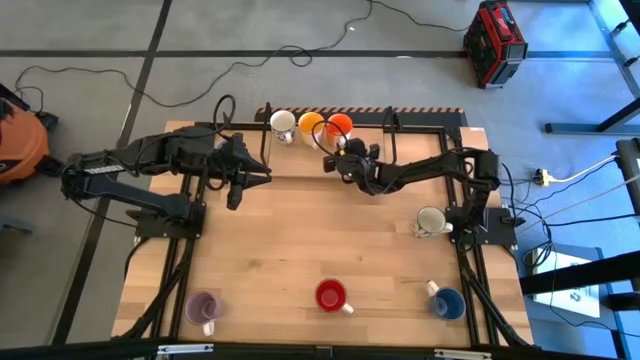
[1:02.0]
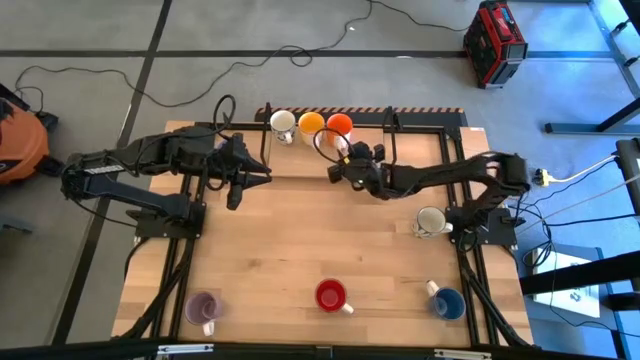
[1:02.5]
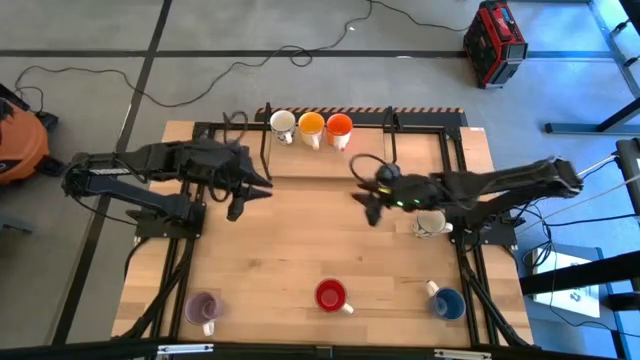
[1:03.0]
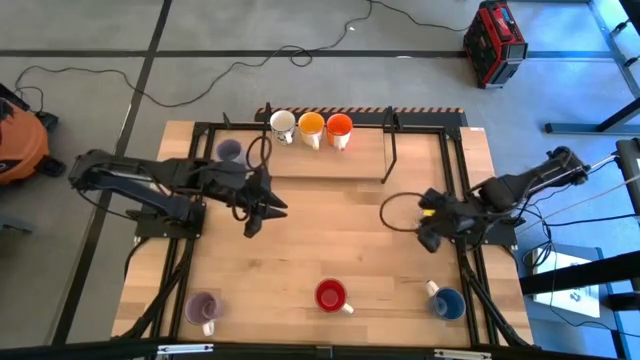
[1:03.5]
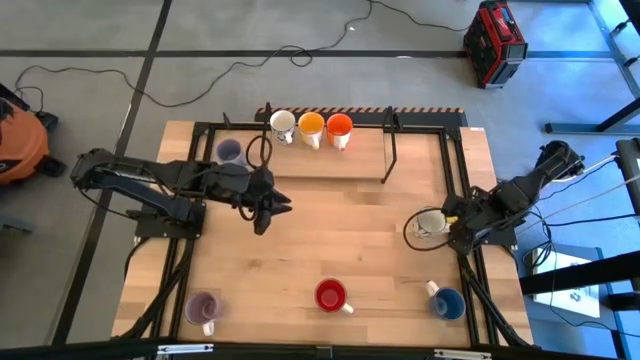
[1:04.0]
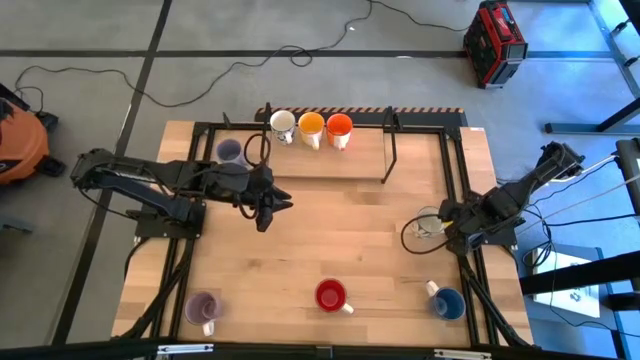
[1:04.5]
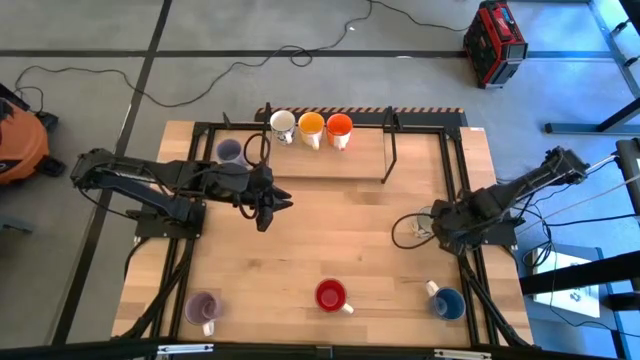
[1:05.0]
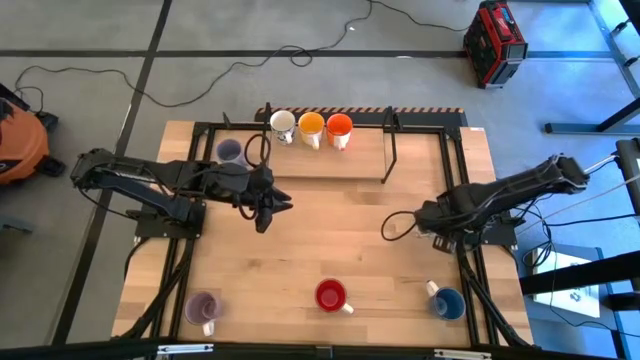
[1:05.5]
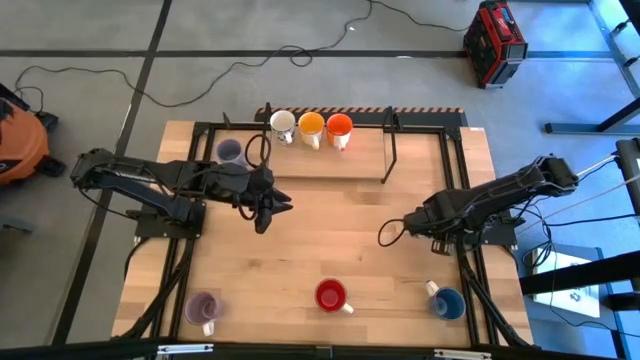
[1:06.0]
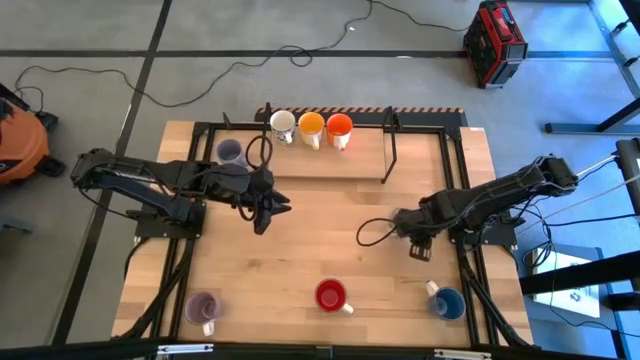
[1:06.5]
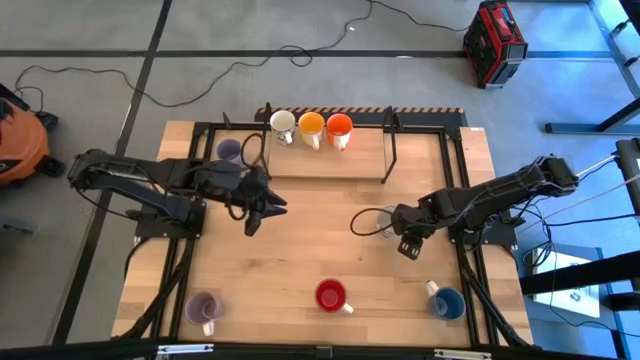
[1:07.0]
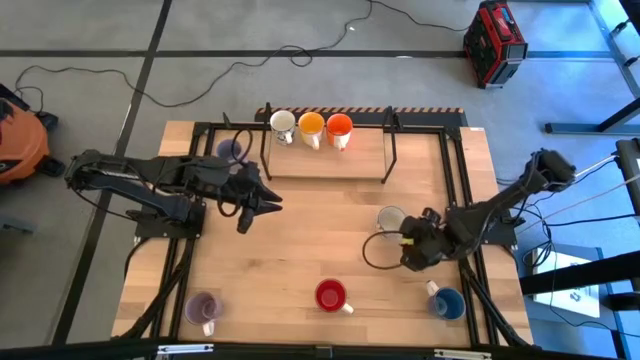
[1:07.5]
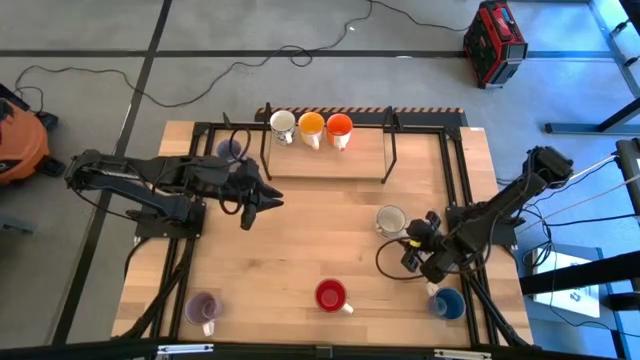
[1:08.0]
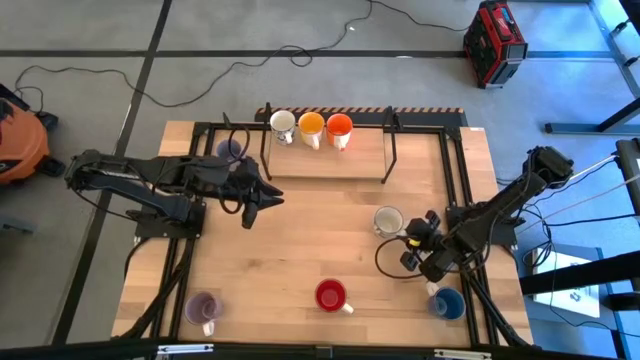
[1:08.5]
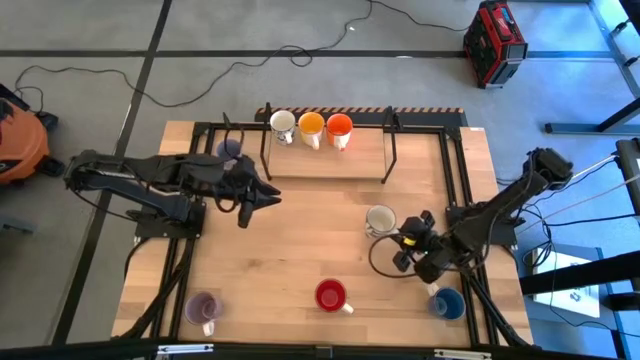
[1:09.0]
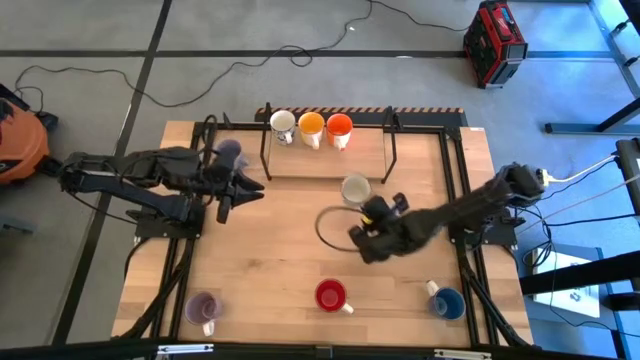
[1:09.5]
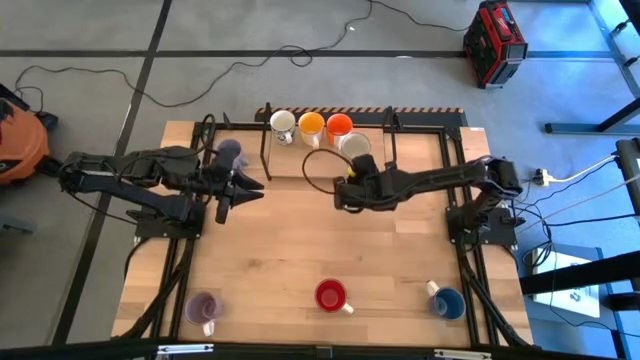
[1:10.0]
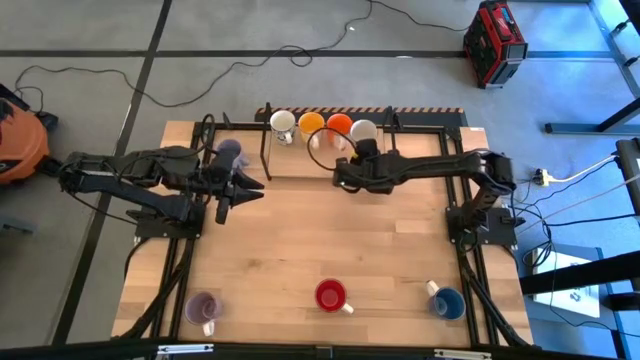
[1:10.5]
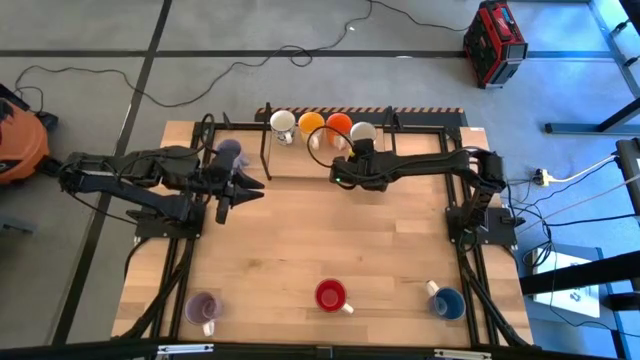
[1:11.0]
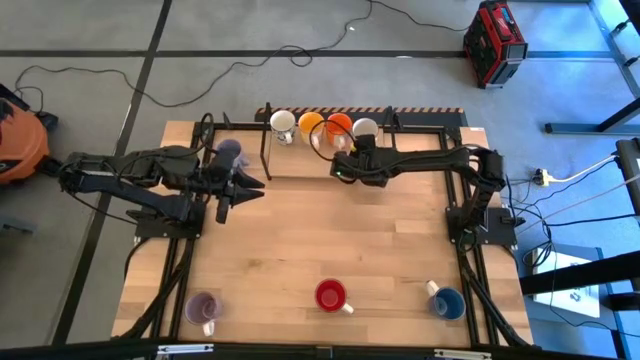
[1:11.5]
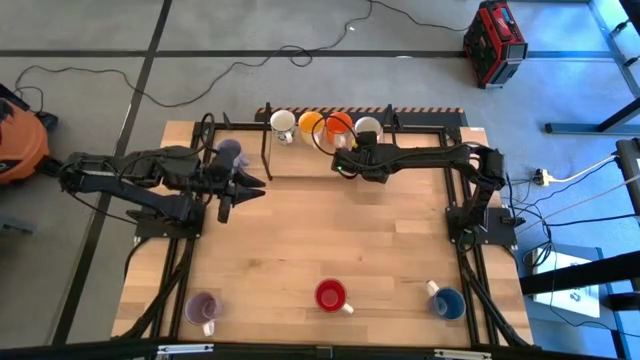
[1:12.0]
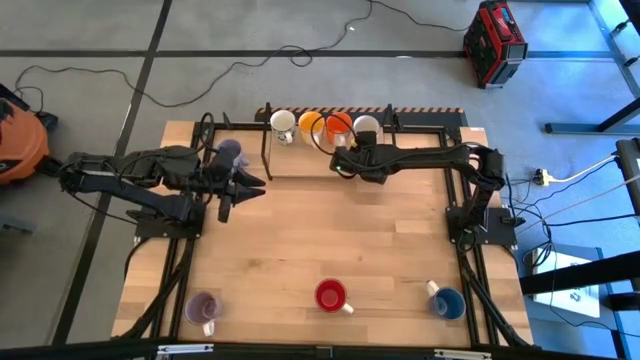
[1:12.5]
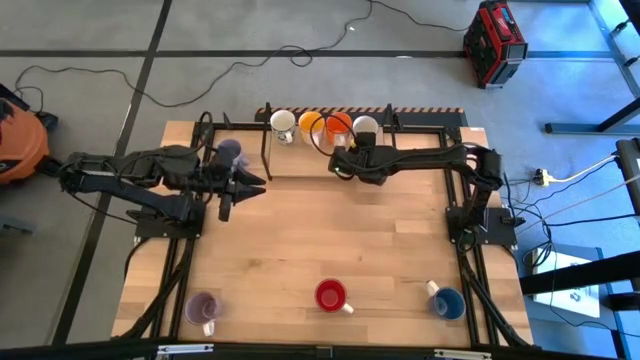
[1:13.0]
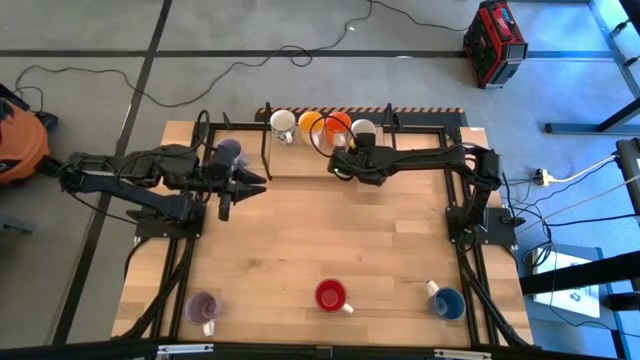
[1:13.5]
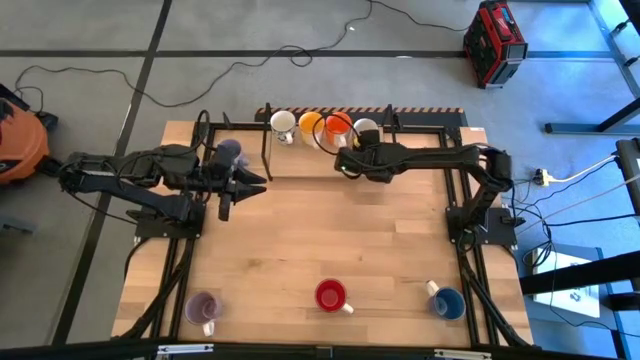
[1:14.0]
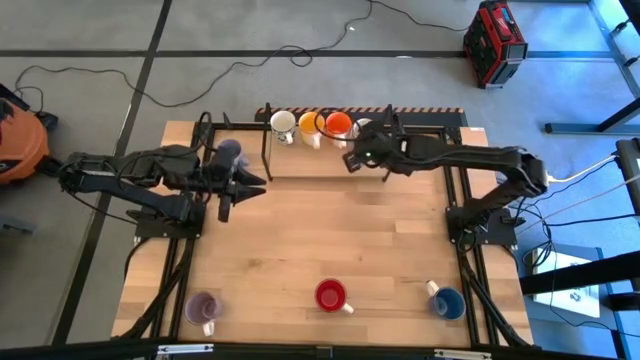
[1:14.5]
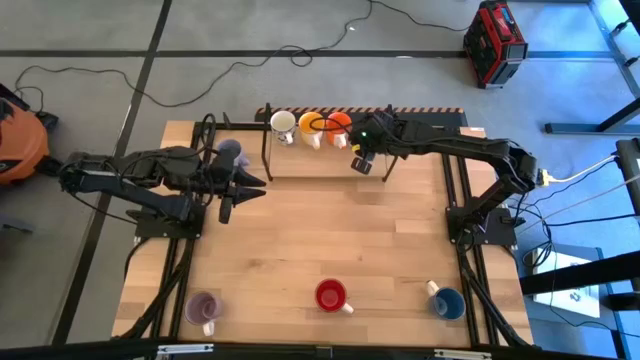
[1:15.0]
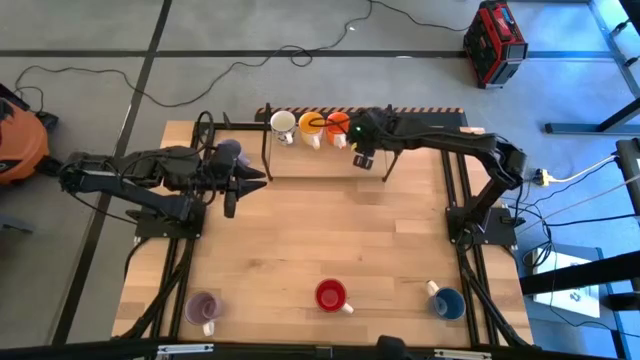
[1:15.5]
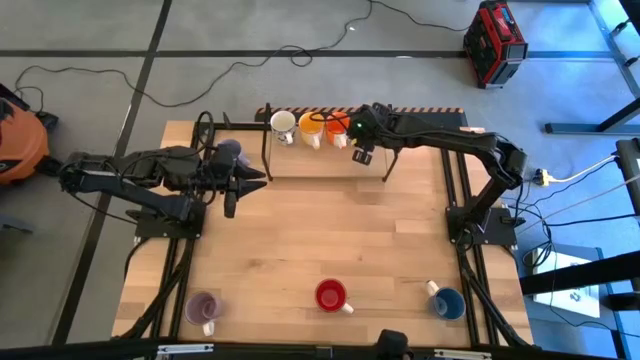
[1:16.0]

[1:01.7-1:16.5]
Task: Place coffee mugs
Put the blue patterned mug on the shelf

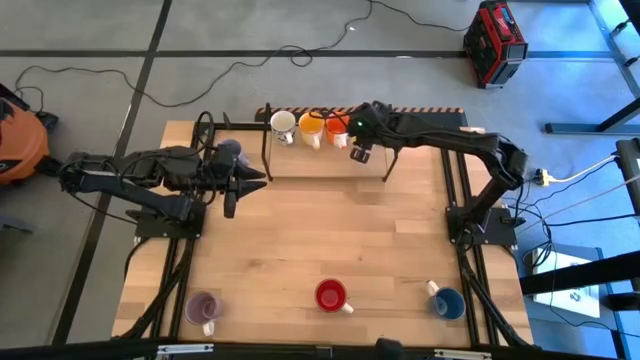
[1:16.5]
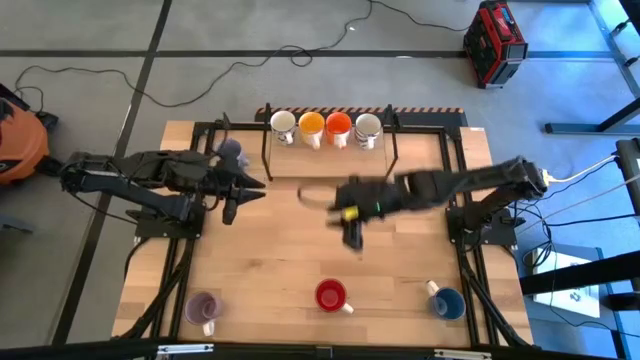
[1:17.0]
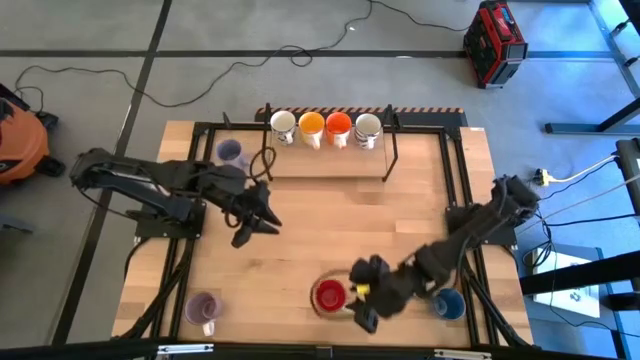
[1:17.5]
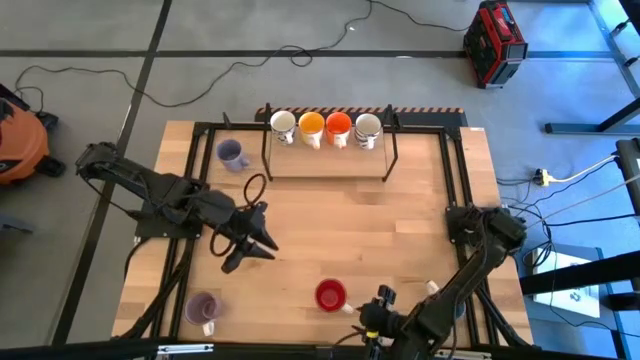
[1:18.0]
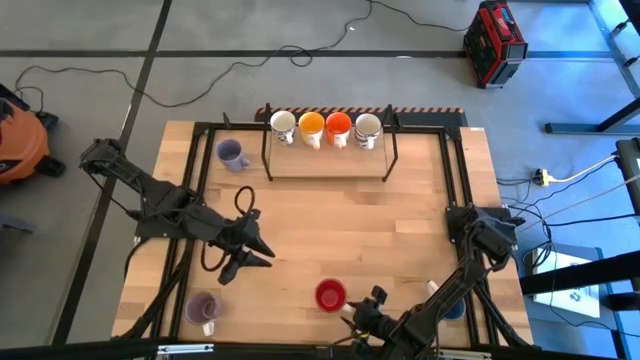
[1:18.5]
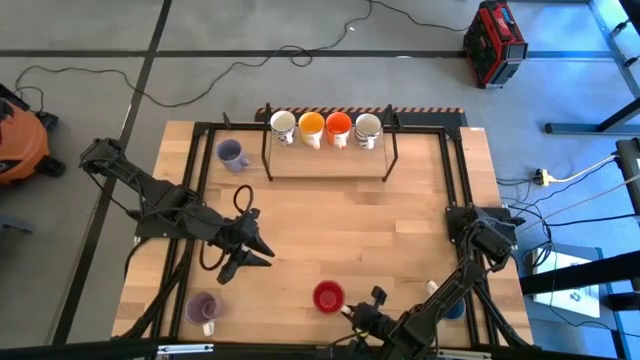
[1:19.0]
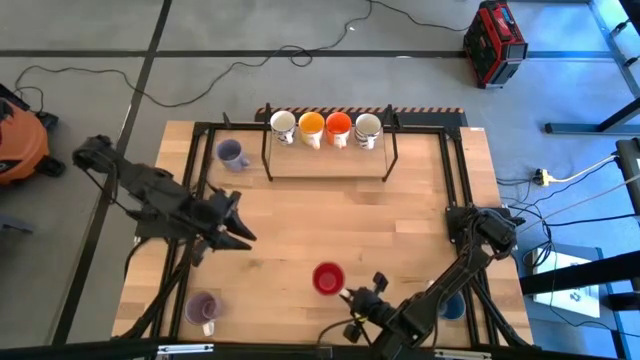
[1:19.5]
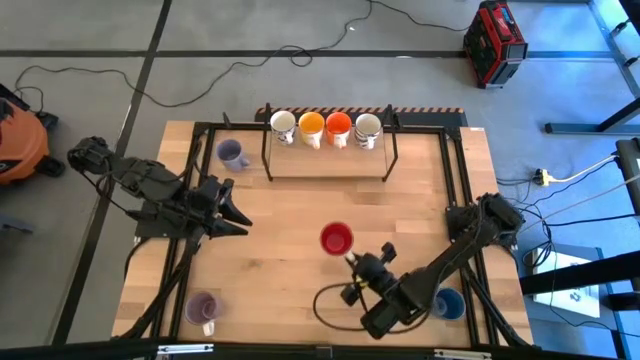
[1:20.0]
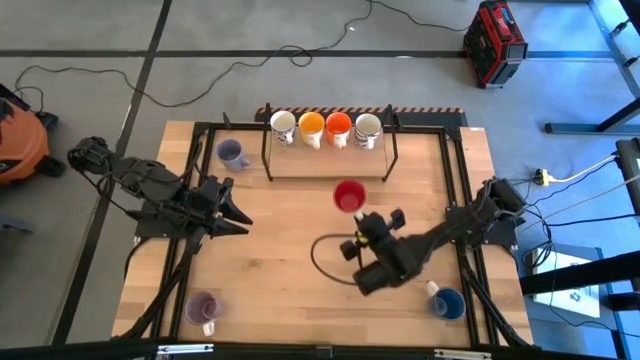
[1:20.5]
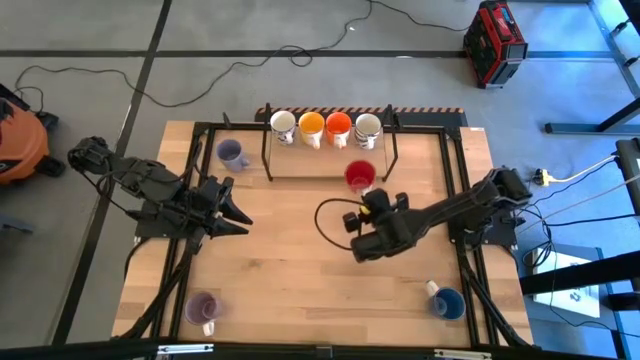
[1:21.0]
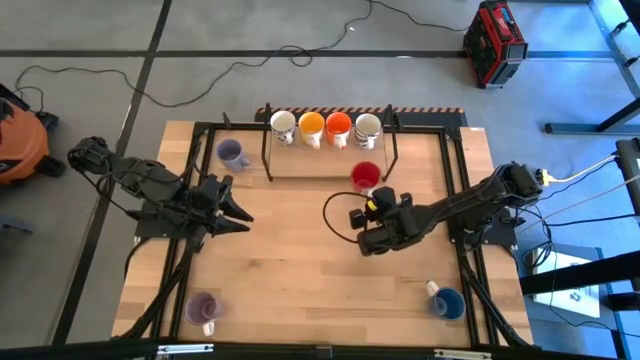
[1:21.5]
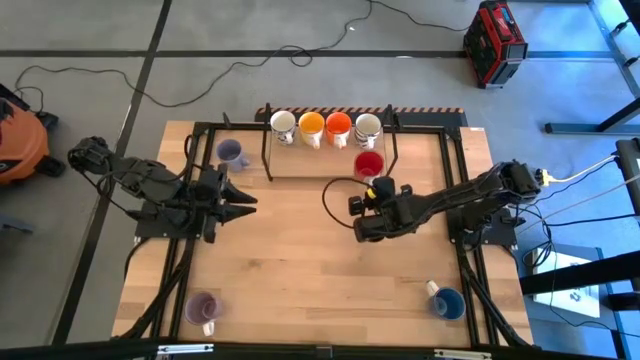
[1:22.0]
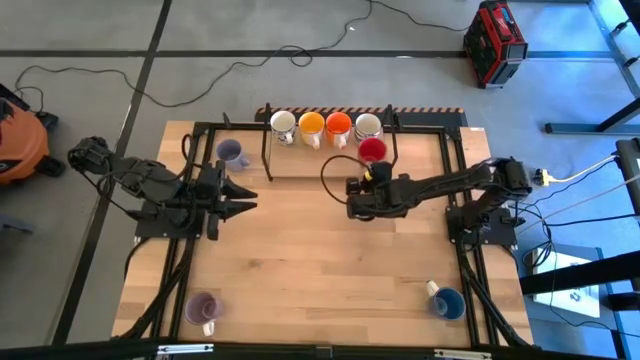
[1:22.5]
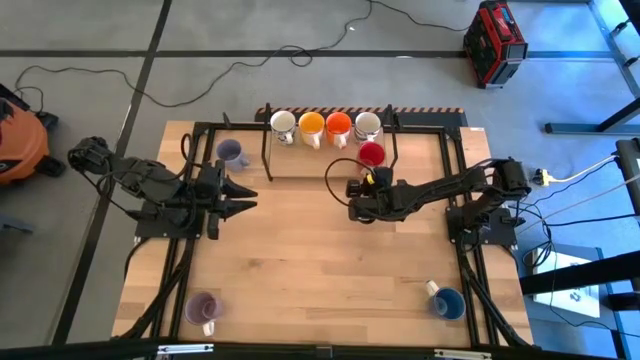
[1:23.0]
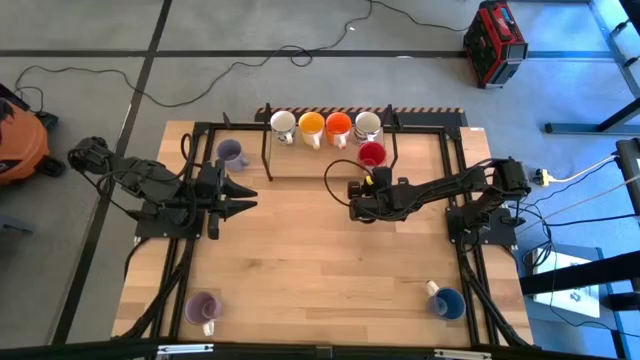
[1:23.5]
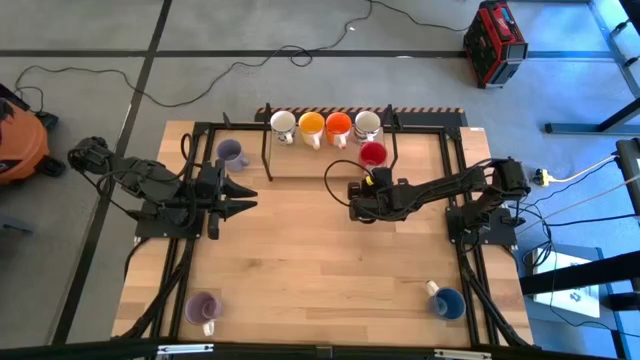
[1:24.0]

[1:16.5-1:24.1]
Put the red mug on the shelf
